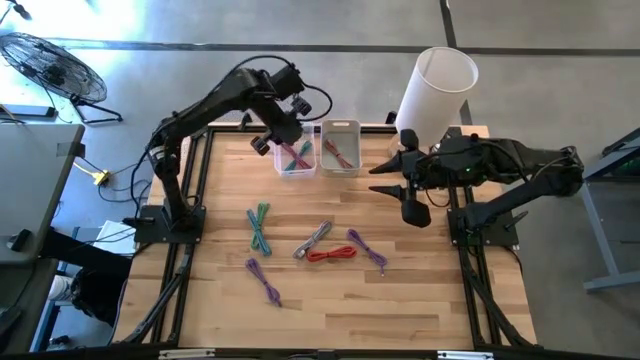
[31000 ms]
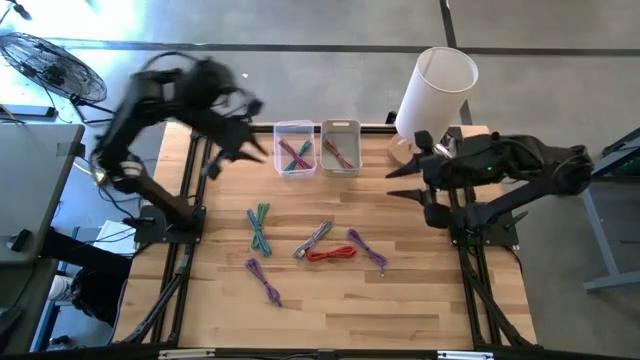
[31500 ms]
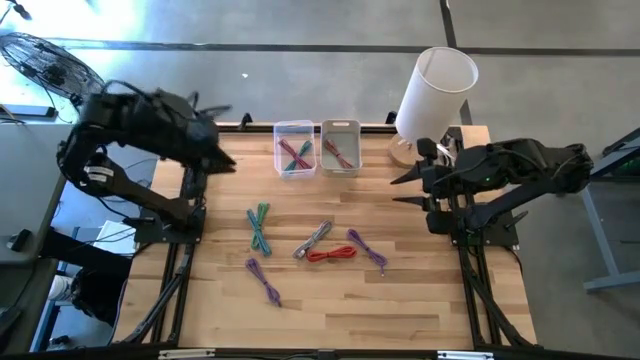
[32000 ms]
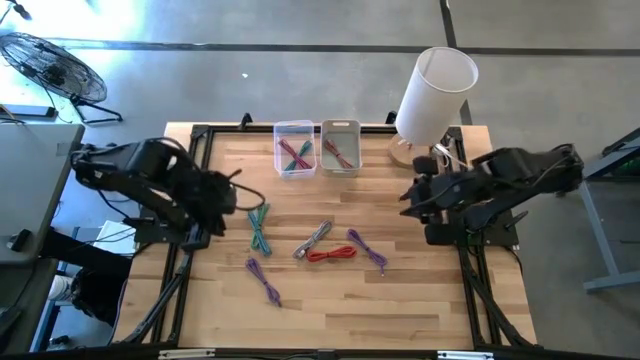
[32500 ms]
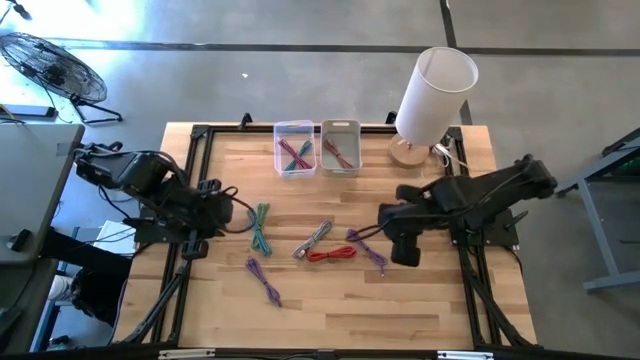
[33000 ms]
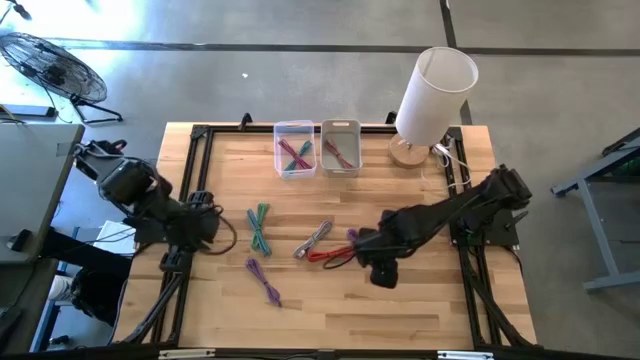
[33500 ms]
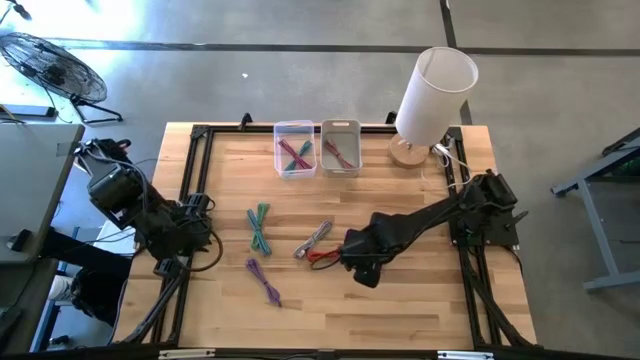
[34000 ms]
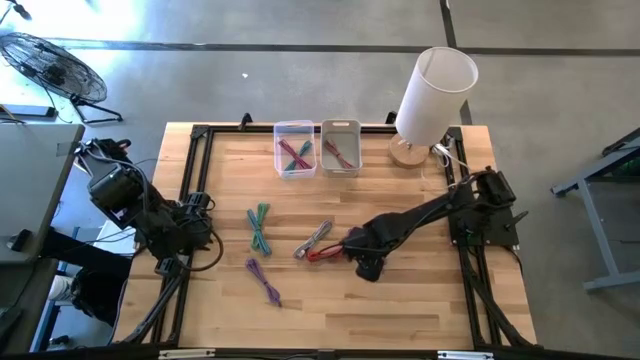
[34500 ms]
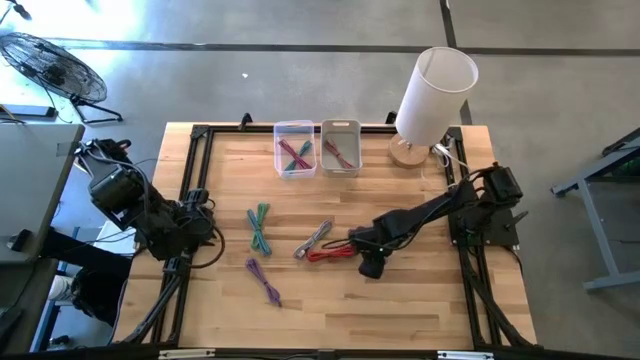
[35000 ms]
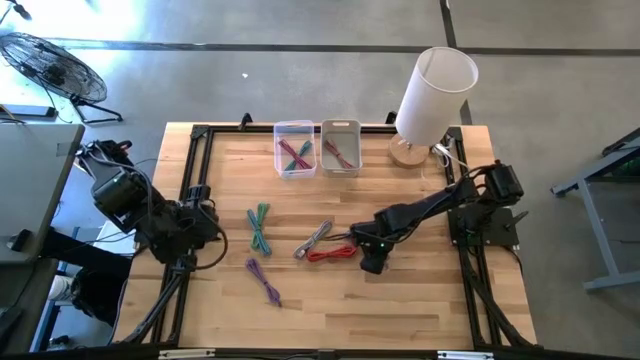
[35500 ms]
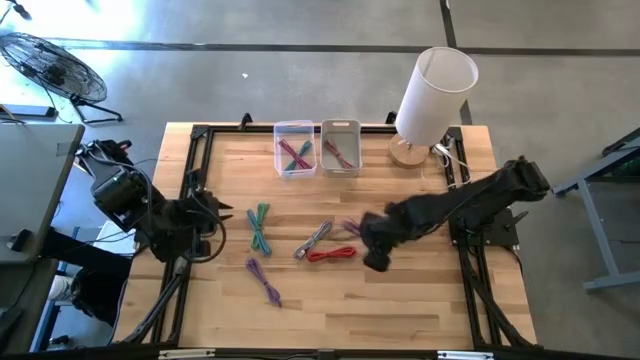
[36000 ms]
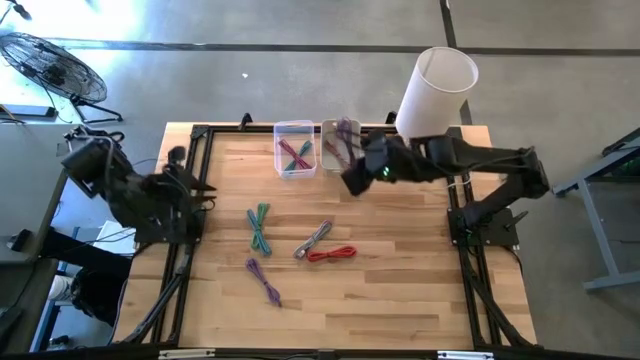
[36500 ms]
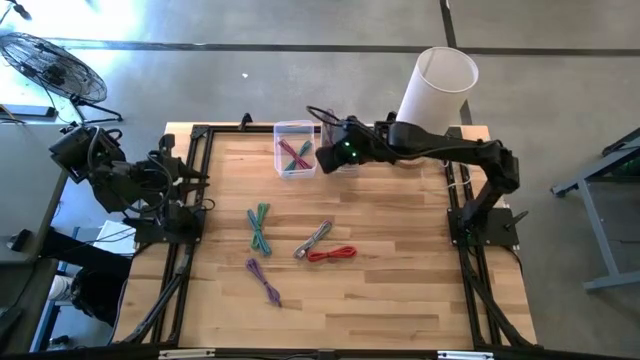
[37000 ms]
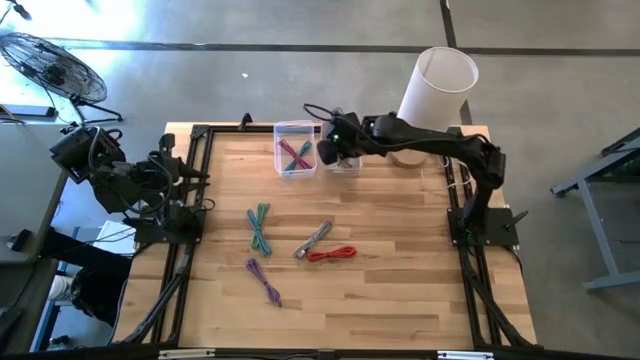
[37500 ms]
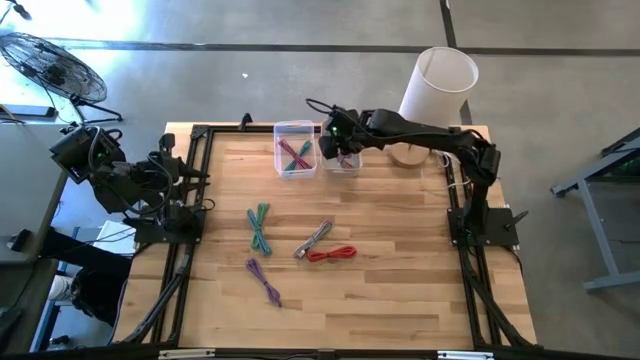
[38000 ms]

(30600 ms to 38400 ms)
Task: Pick & Place USB Port
Put the violet charger cable into the gray bin

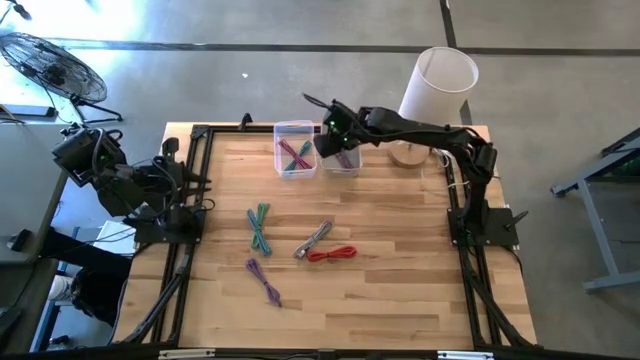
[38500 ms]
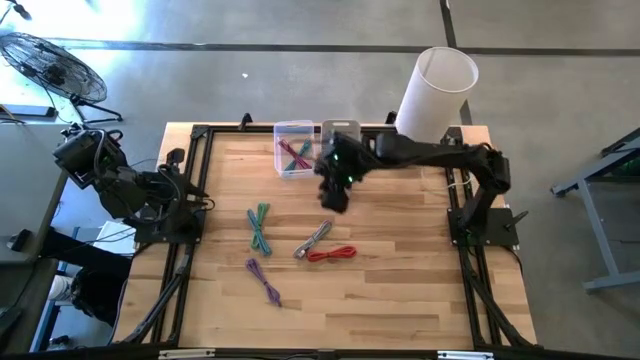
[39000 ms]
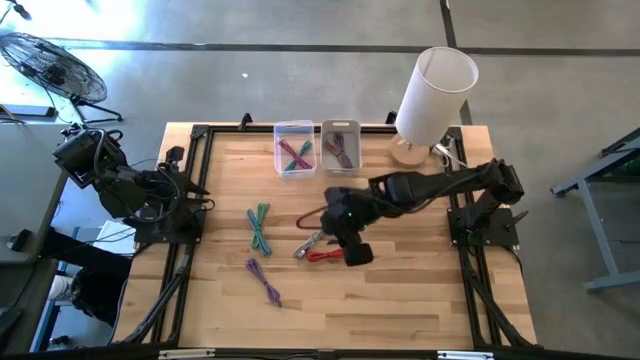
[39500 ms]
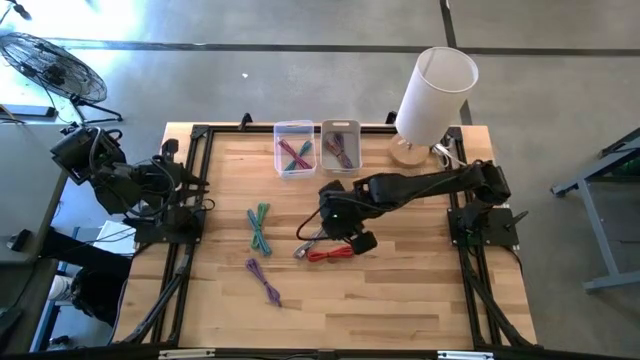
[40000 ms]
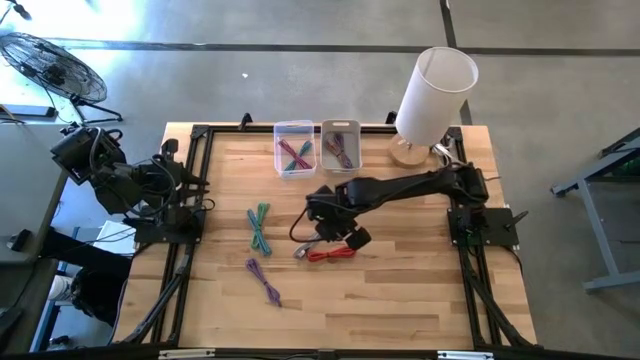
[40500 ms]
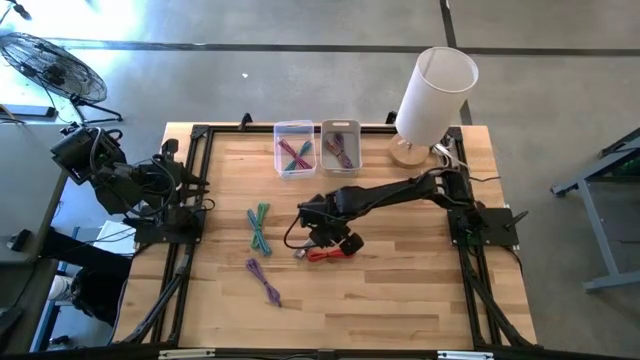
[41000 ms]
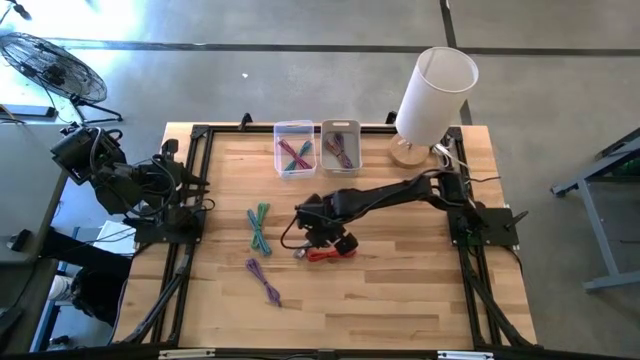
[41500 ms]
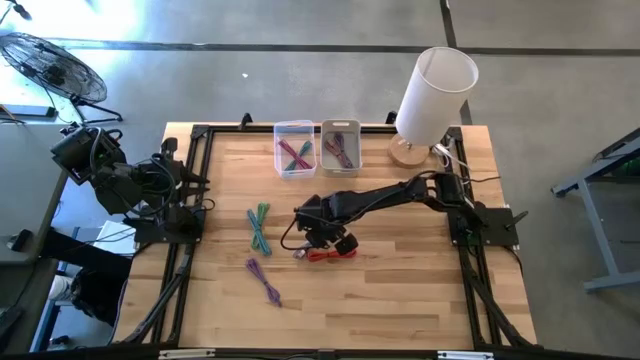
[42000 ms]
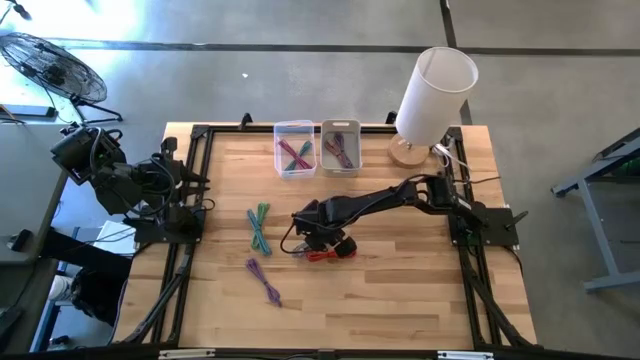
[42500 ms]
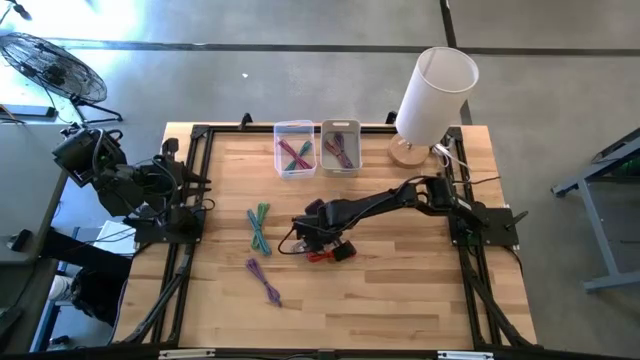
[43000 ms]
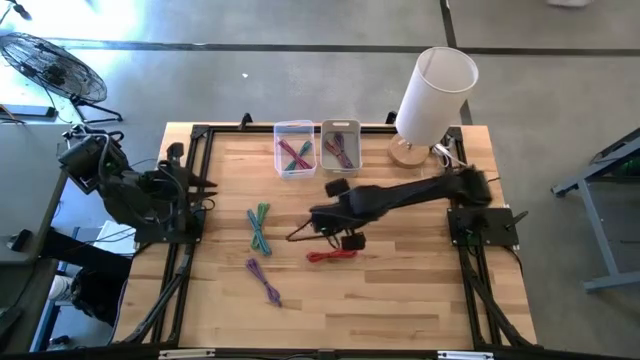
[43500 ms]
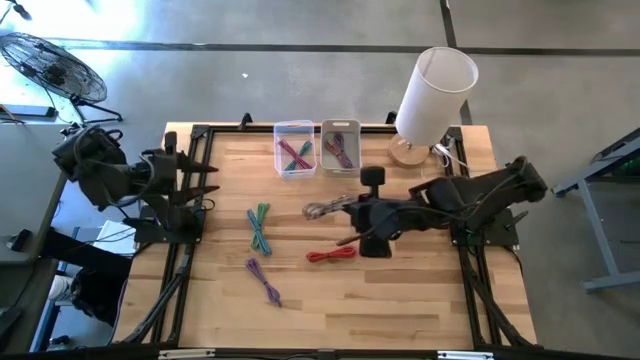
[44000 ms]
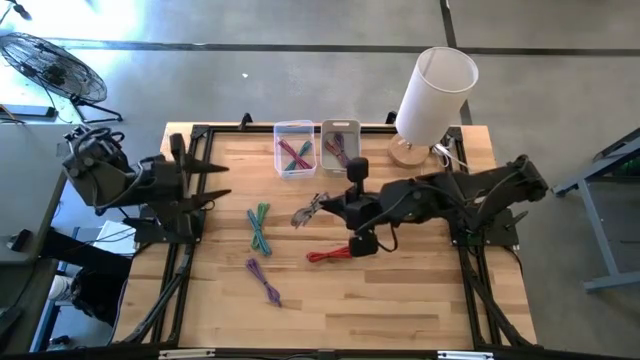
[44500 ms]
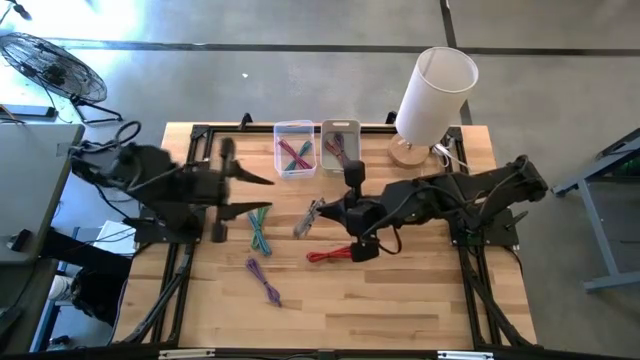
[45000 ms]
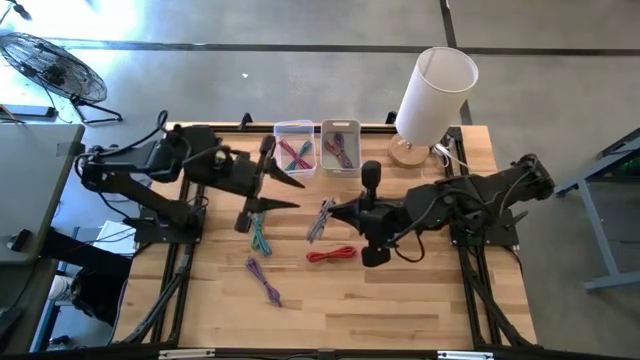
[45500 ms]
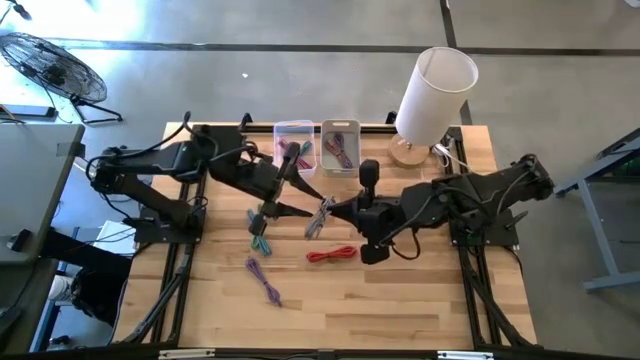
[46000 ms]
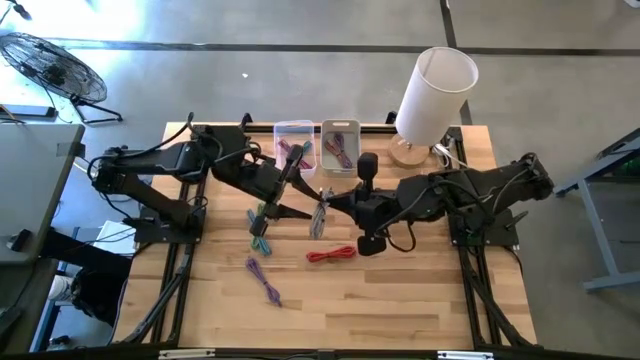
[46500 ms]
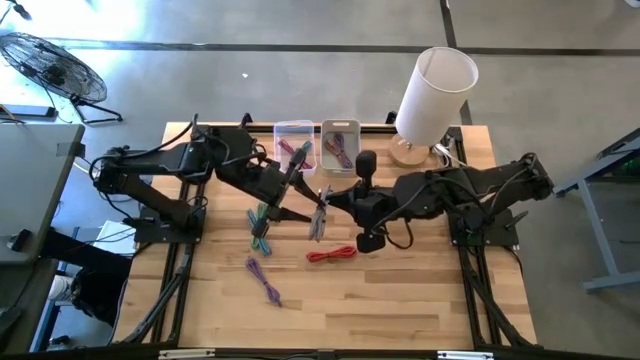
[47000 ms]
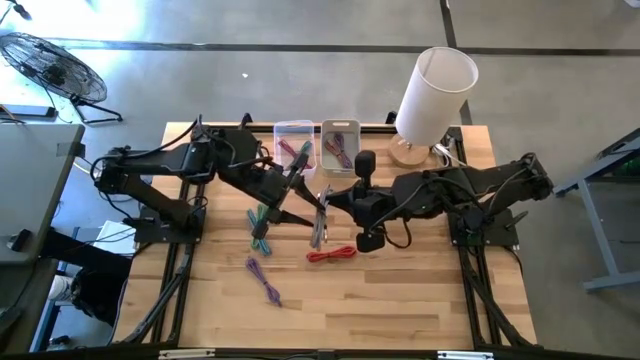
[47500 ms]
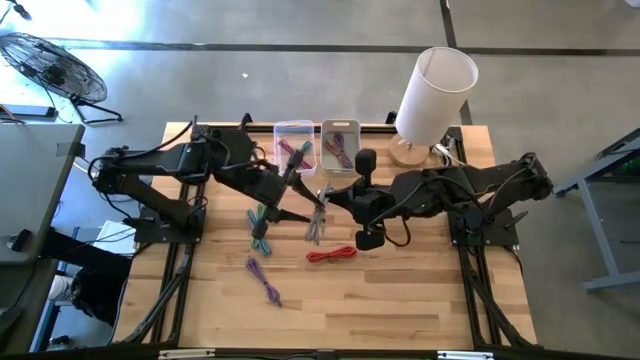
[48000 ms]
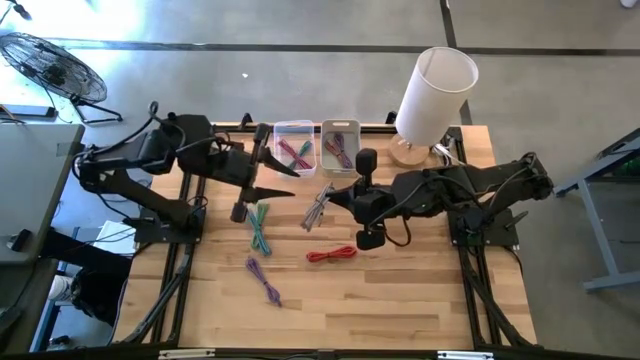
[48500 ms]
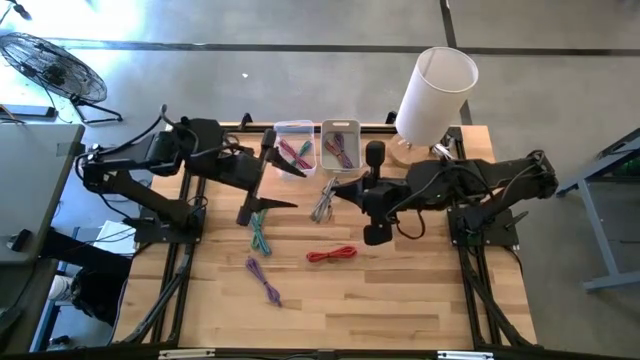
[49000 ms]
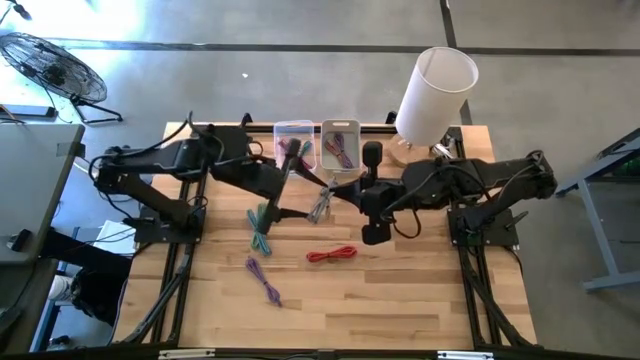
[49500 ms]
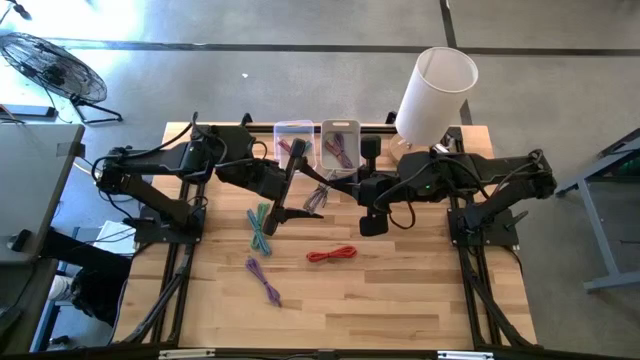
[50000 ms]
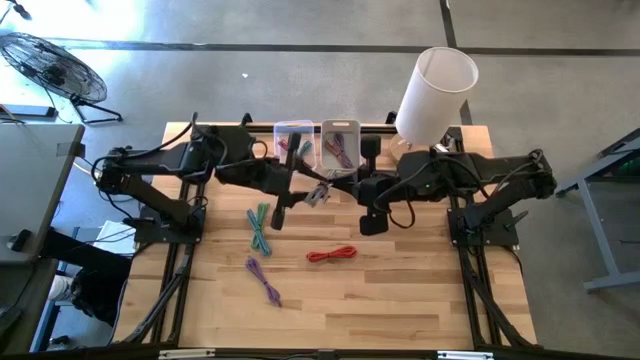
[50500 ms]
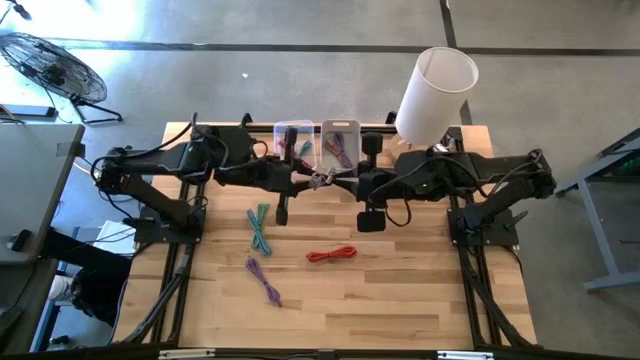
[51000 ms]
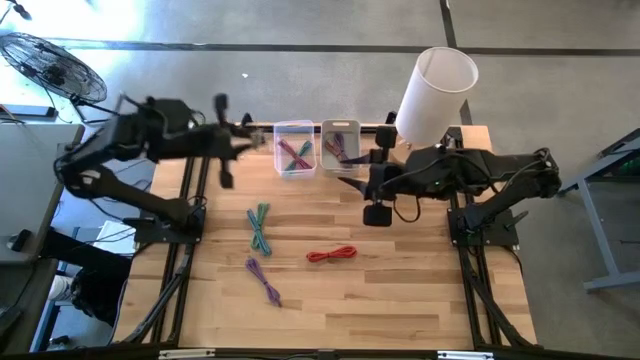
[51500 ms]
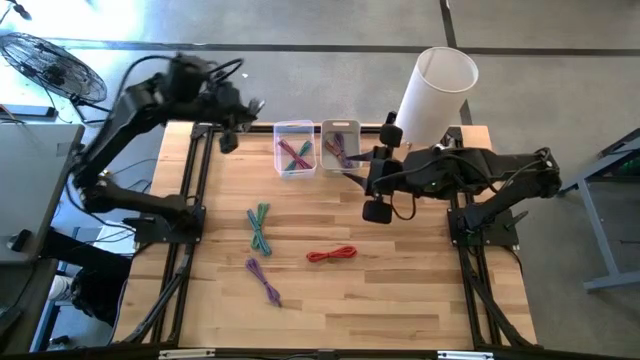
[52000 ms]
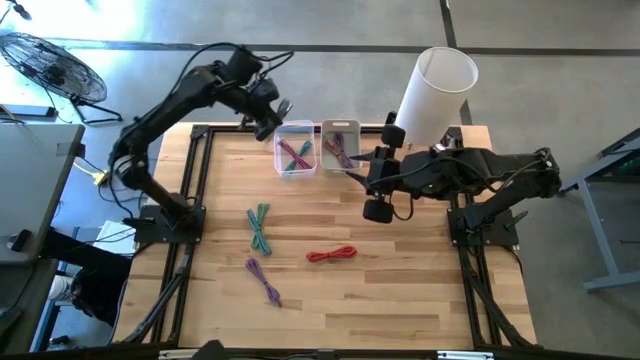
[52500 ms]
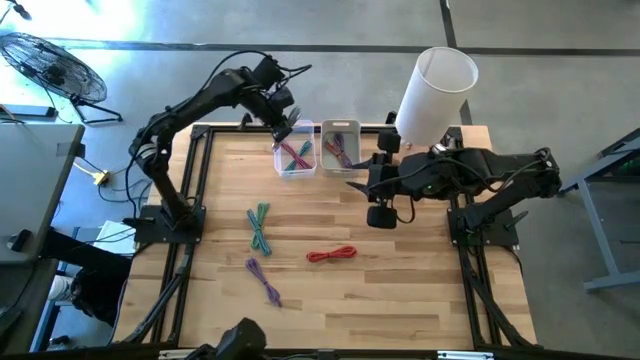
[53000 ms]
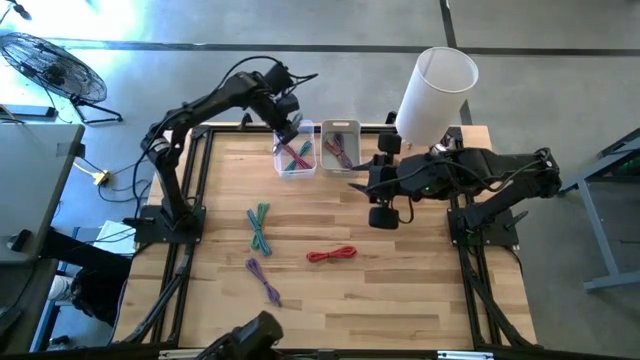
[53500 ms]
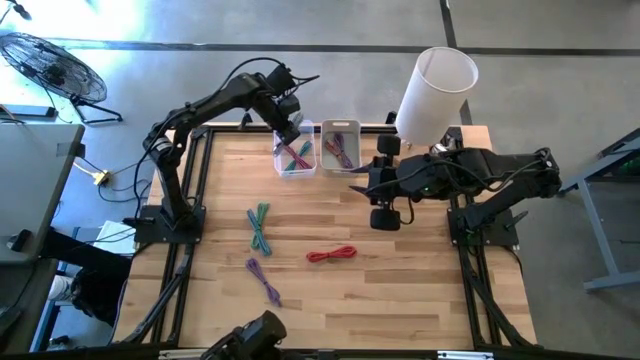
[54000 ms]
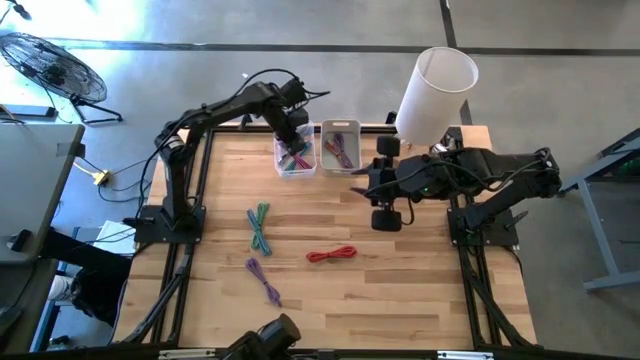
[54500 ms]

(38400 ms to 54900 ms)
Put the black patterned charger cable into the transparent bin
